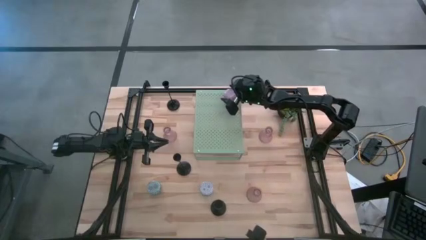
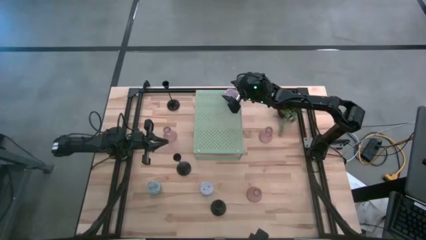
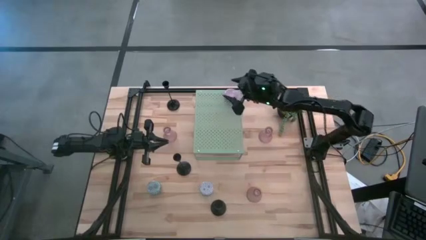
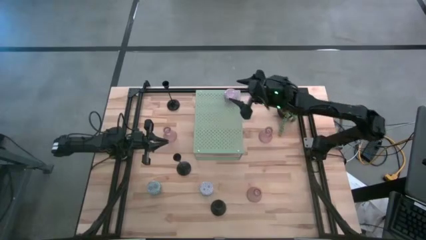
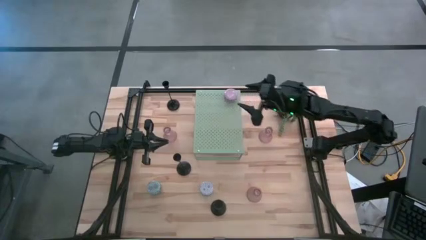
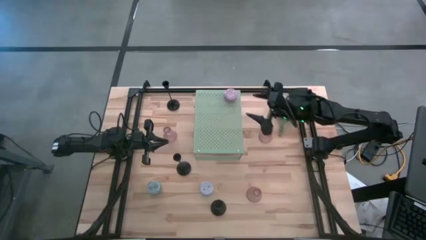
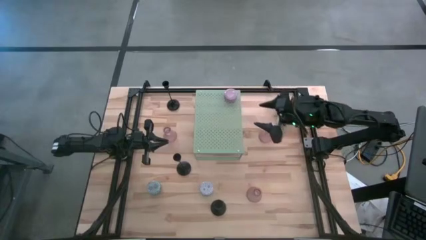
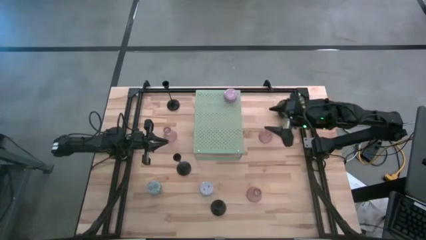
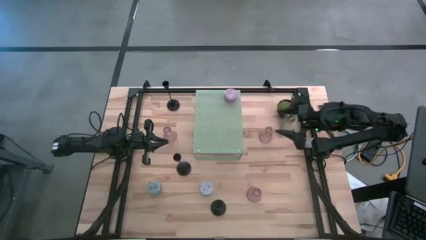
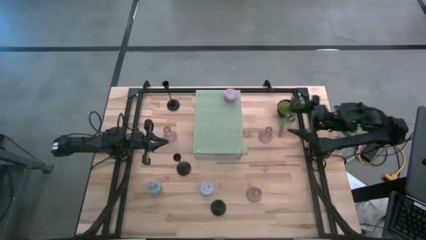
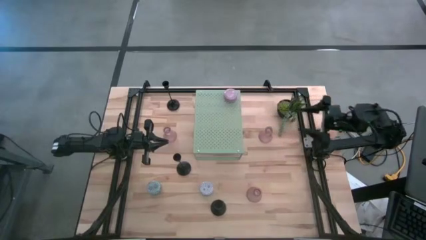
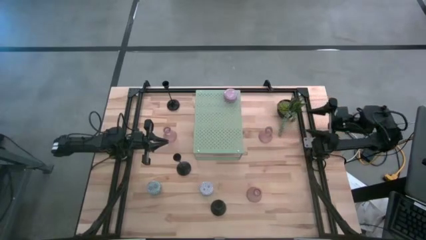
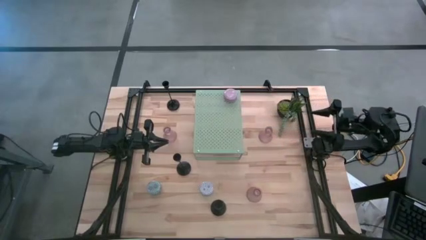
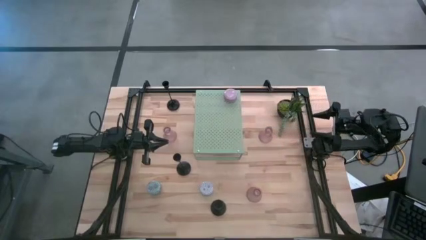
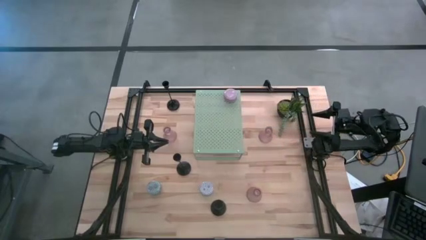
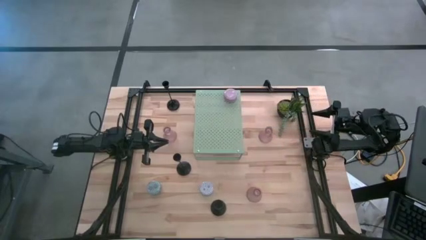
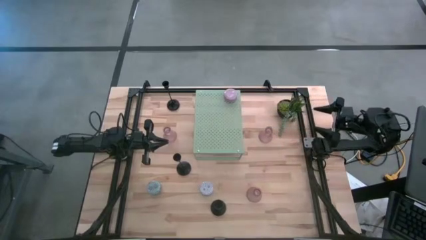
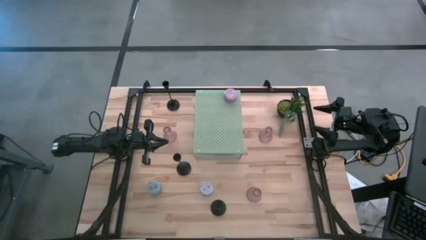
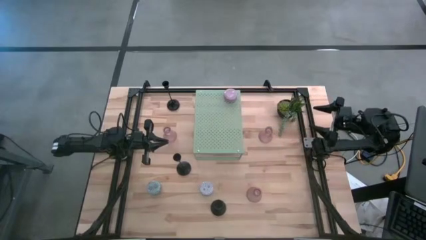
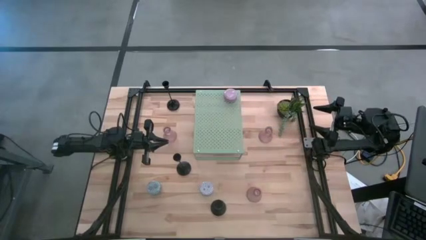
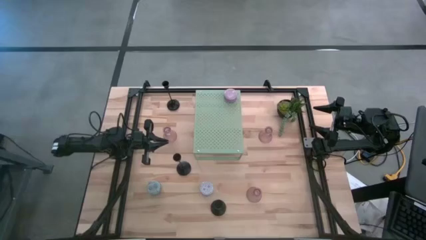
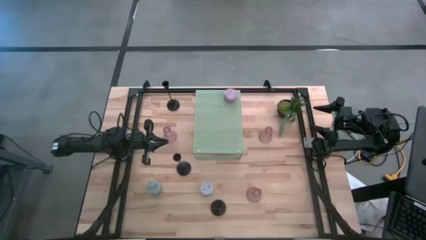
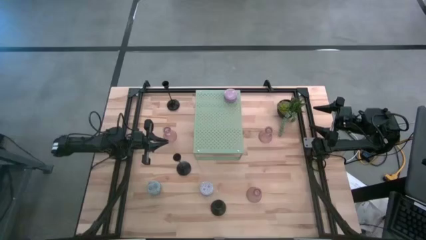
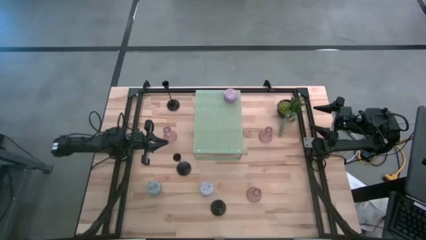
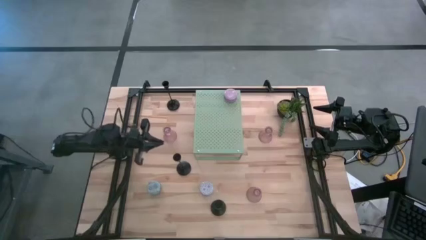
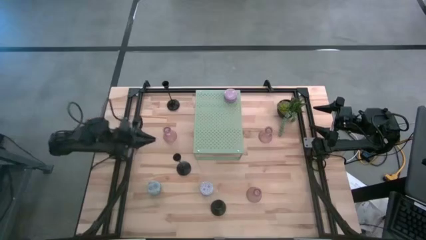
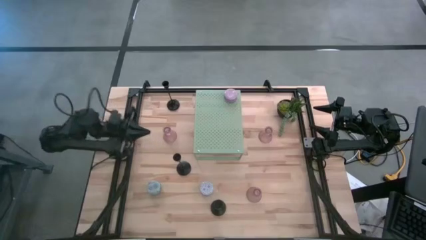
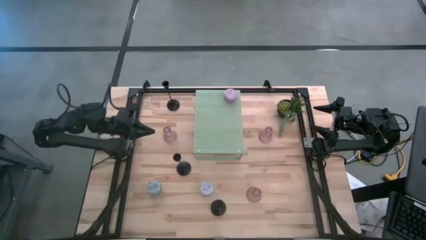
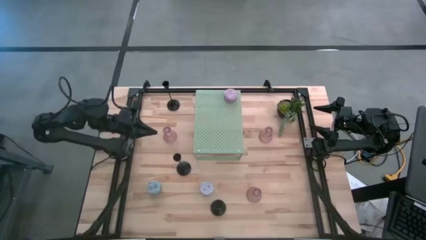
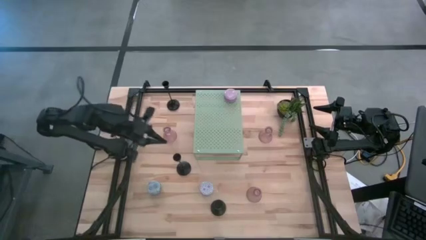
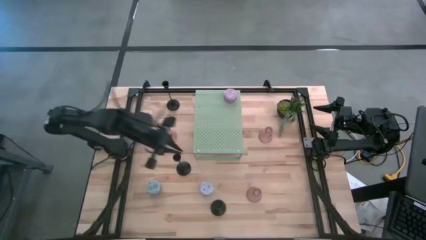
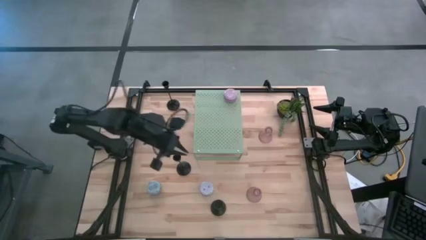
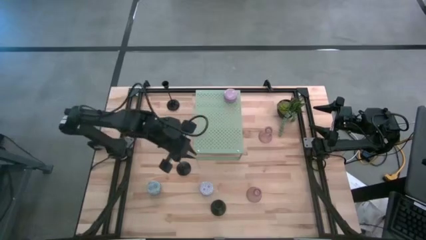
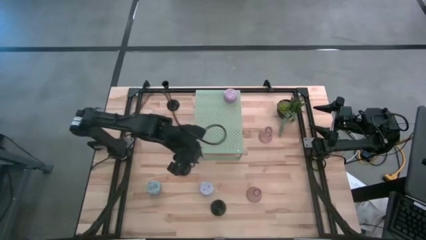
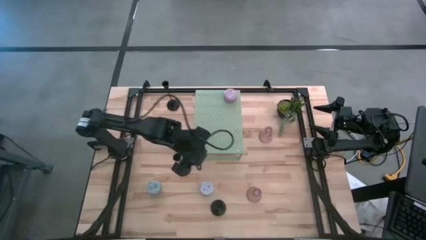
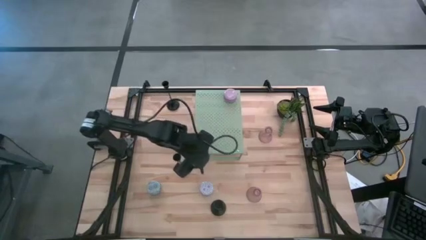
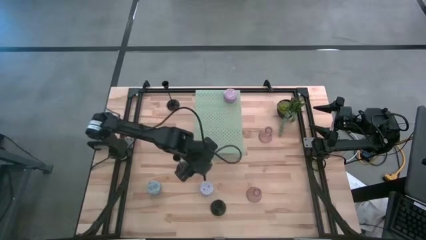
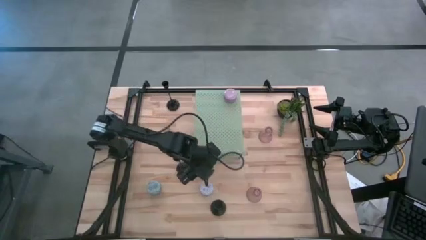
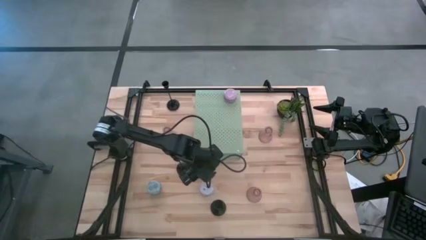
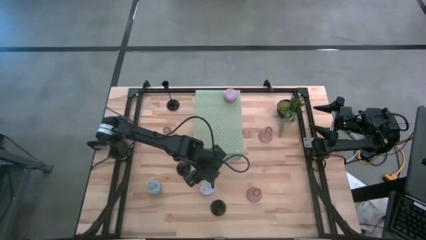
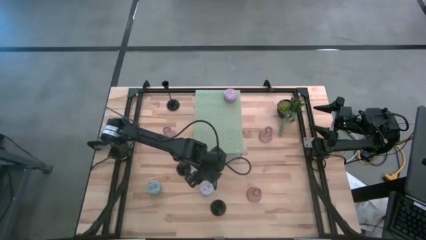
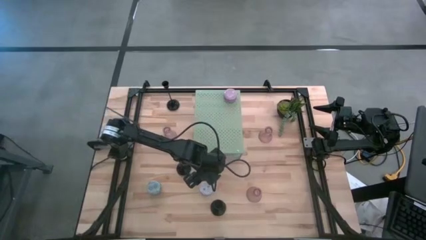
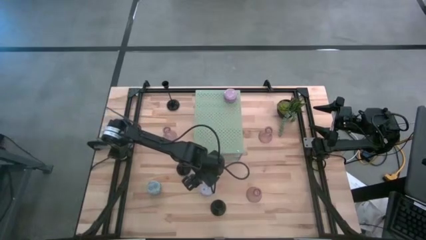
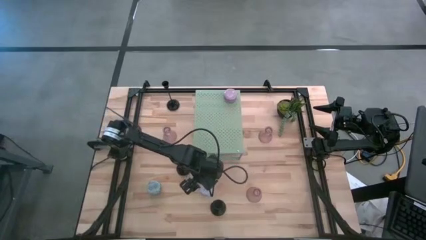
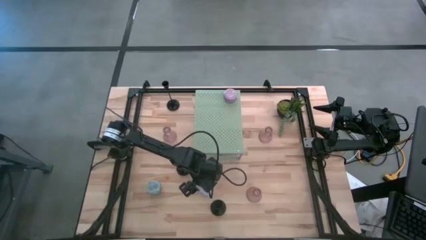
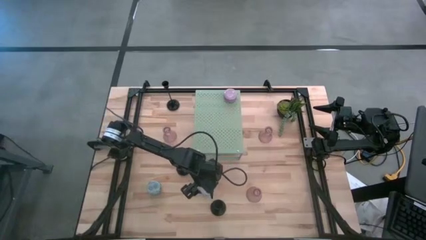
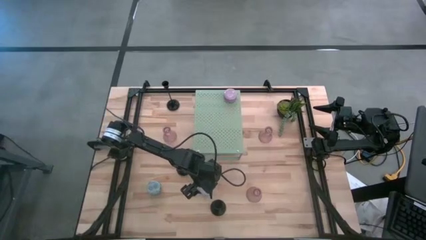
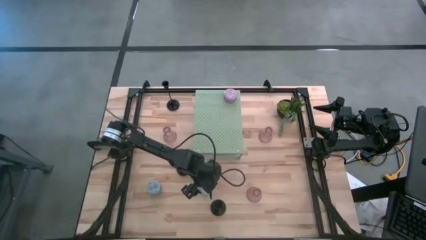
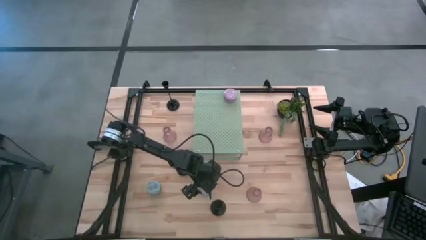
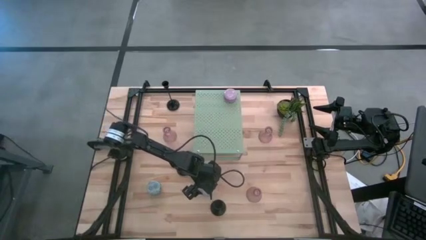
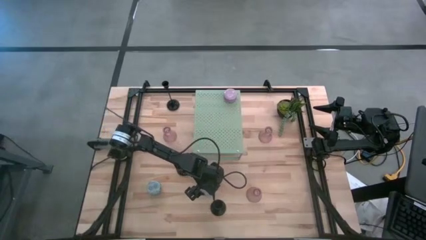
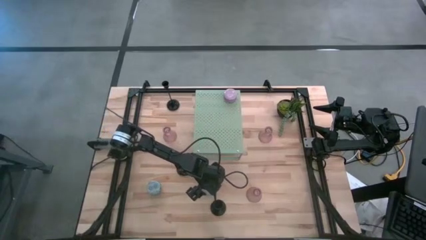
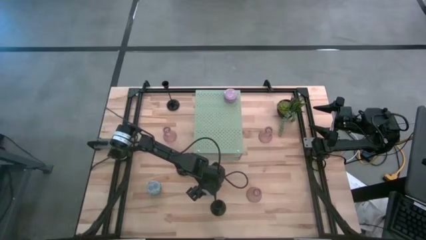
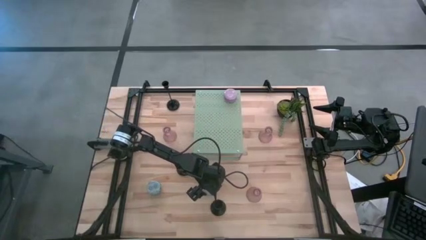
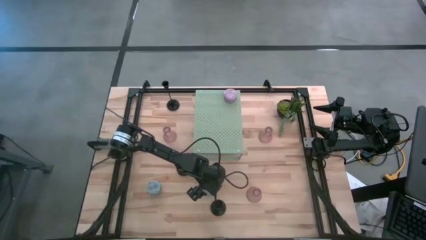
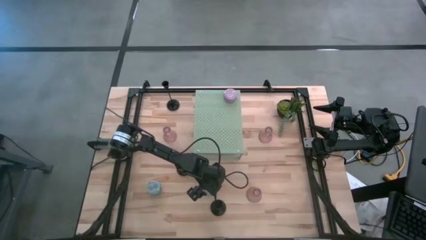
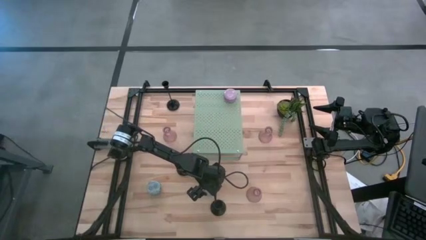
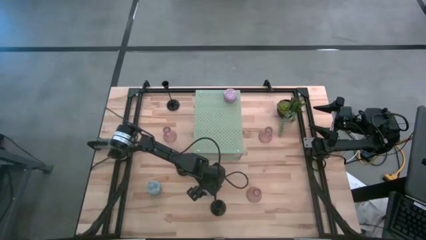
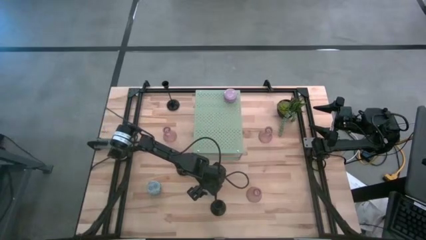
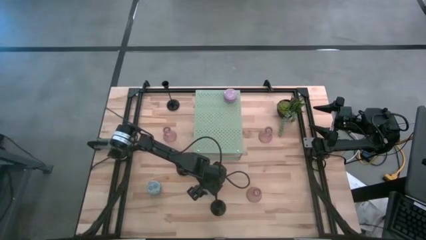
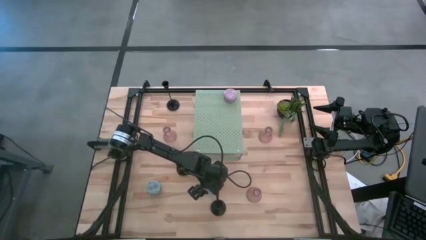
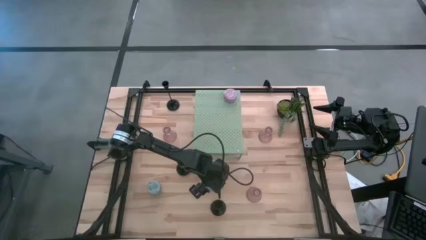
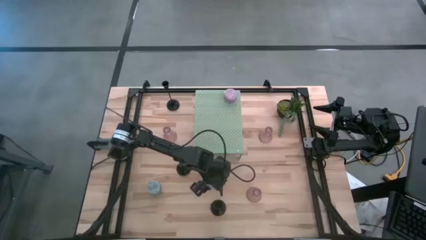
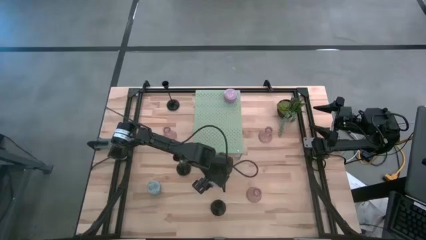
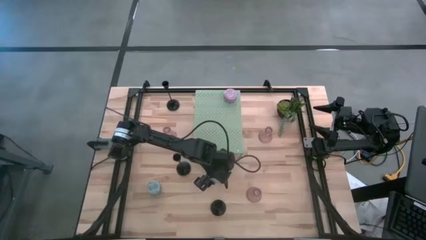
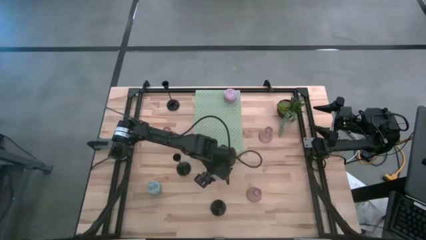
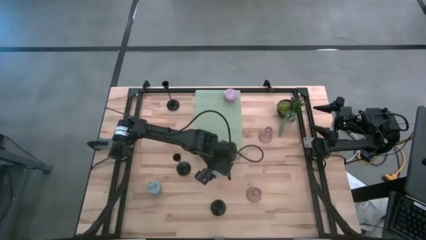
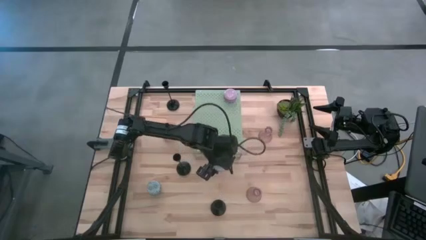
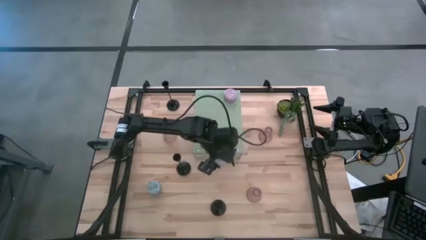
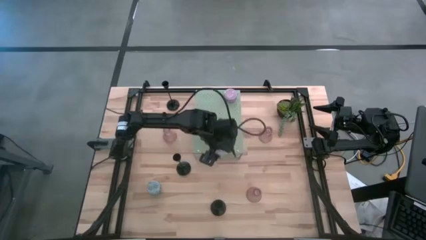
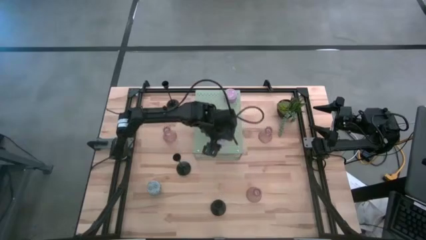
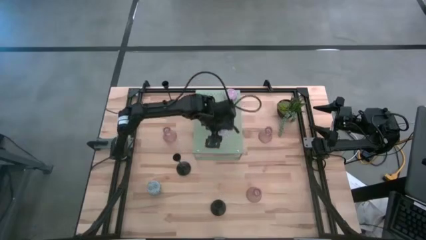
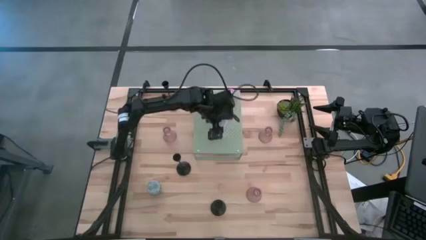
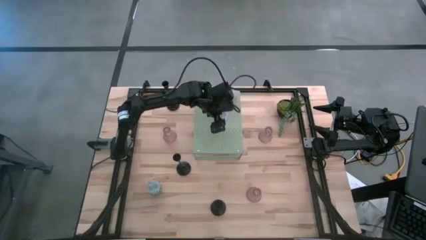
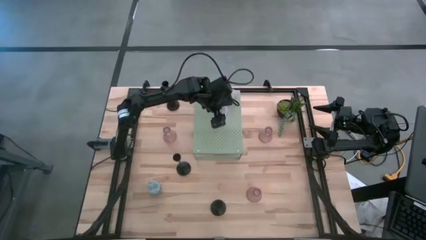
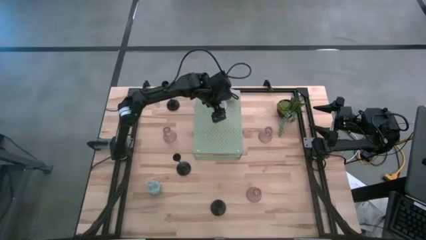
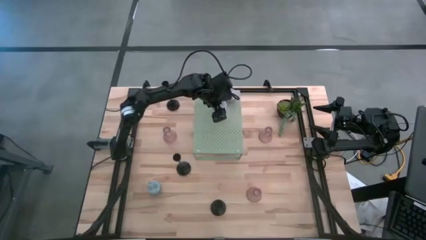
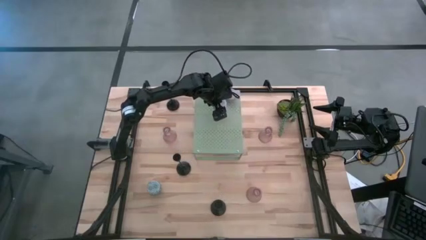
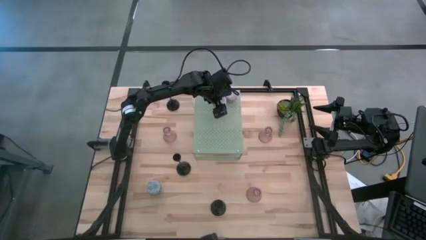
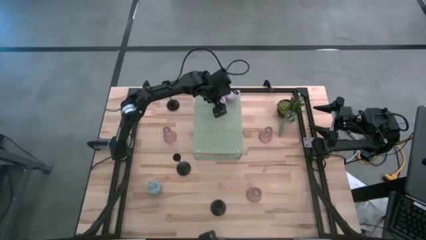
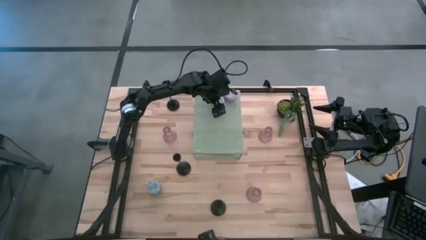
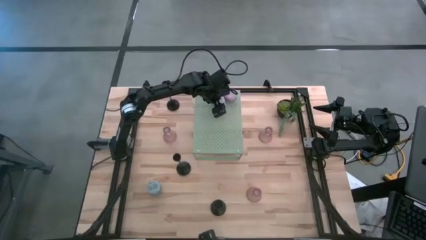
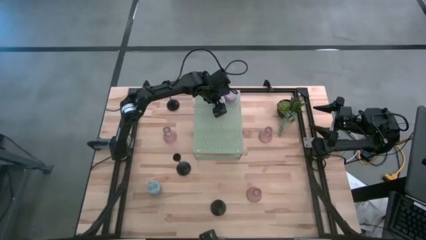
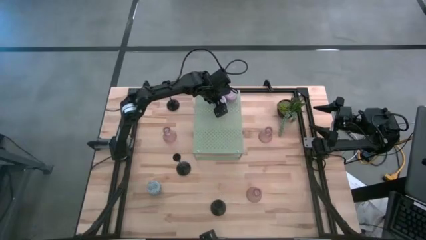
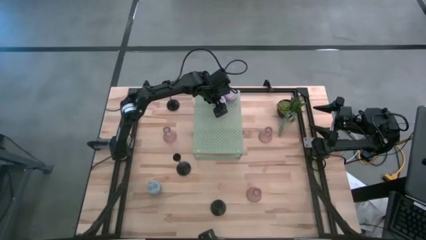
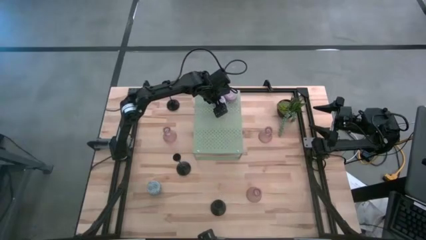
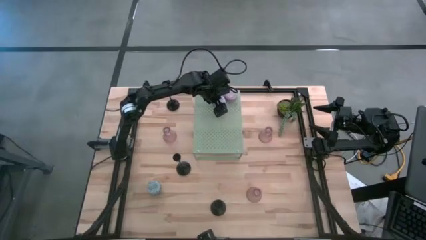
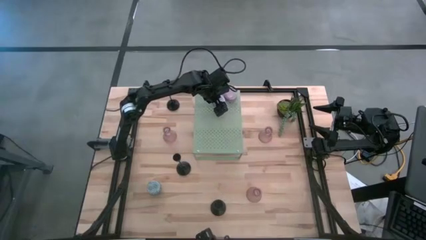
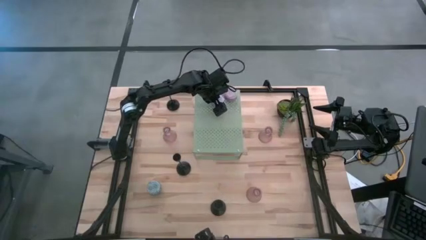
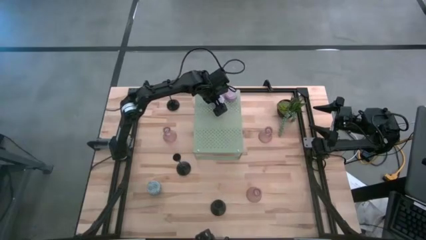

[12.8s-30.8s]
Task: Pick & Place candle stick holders
Put the right candle on the shelf
